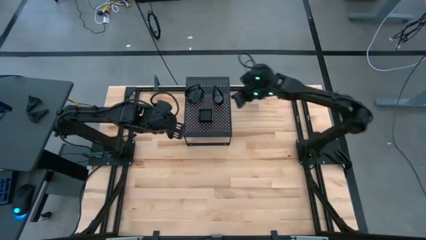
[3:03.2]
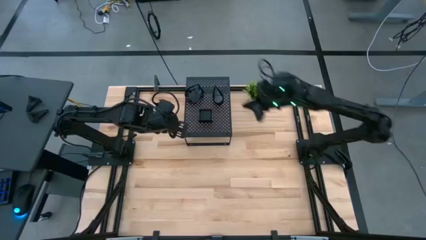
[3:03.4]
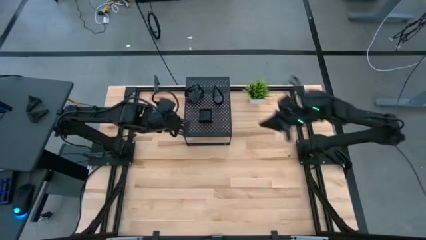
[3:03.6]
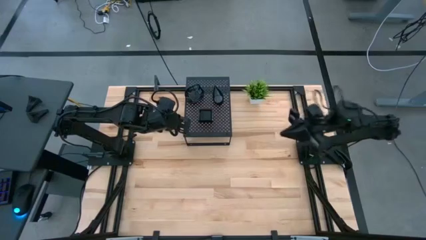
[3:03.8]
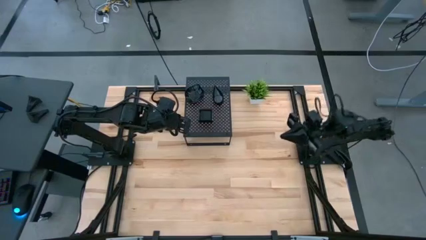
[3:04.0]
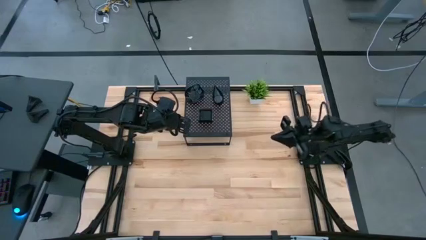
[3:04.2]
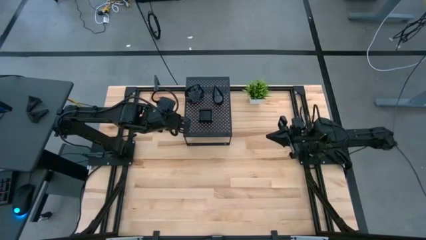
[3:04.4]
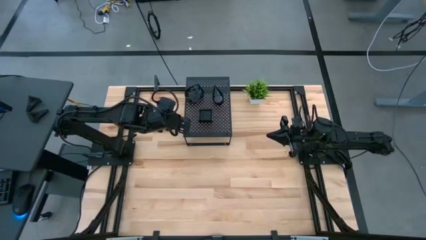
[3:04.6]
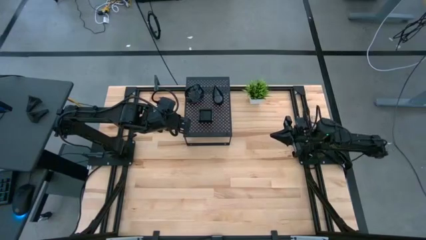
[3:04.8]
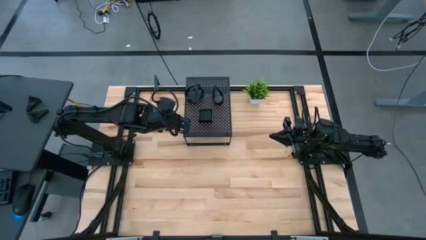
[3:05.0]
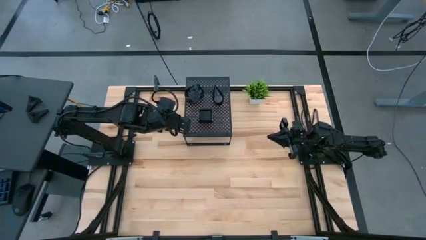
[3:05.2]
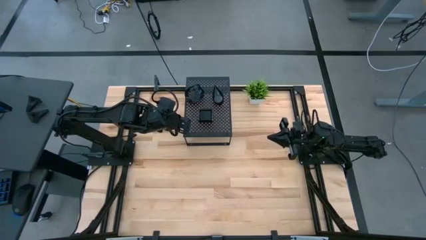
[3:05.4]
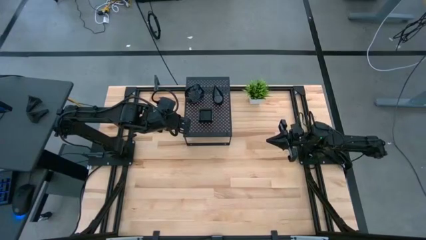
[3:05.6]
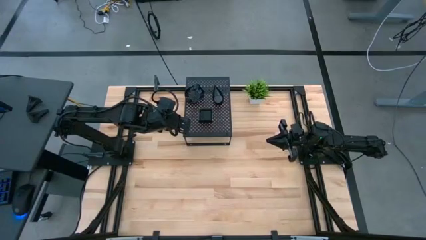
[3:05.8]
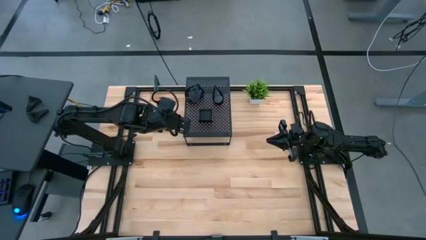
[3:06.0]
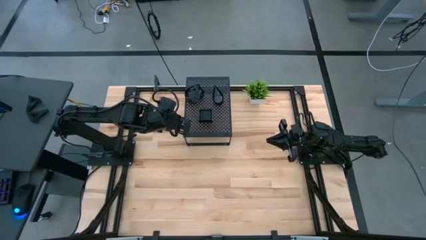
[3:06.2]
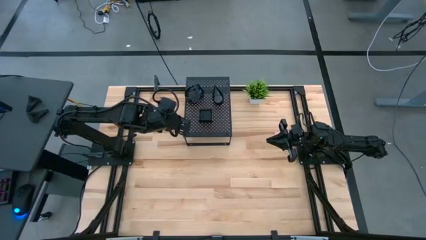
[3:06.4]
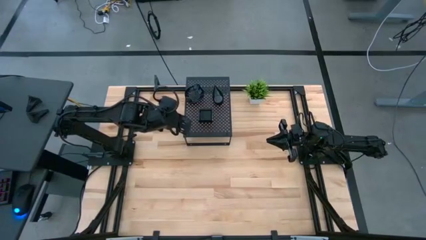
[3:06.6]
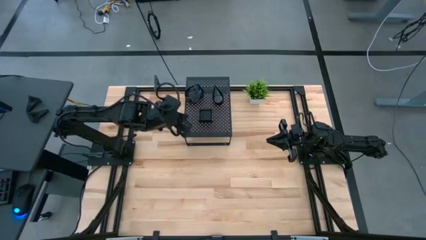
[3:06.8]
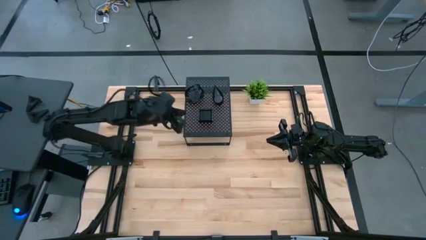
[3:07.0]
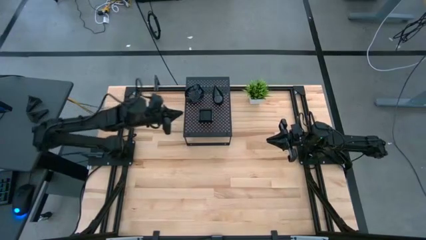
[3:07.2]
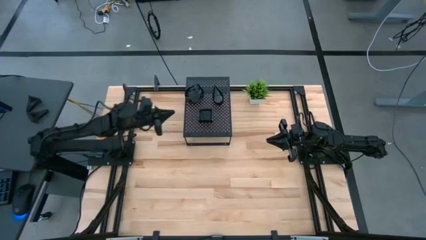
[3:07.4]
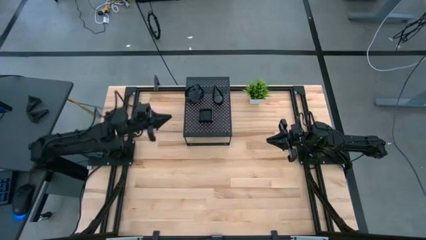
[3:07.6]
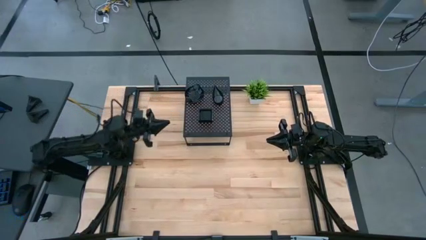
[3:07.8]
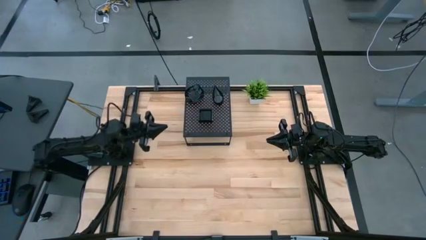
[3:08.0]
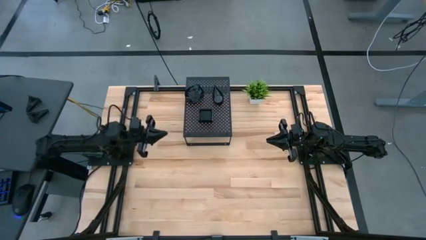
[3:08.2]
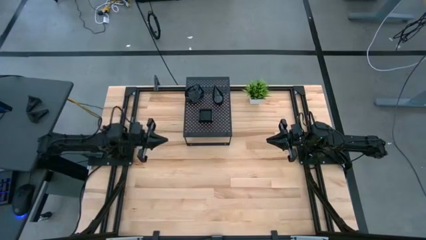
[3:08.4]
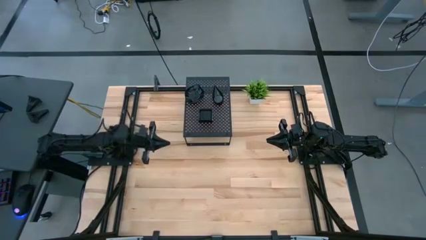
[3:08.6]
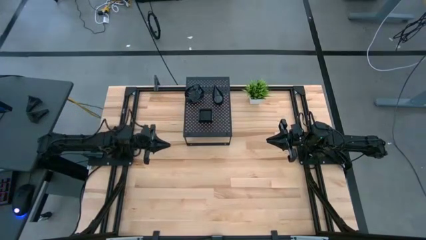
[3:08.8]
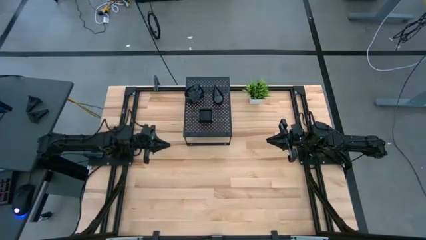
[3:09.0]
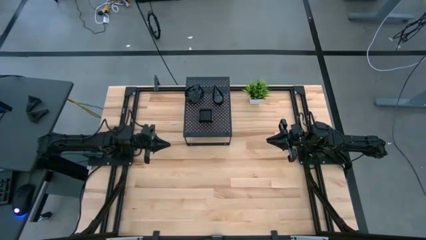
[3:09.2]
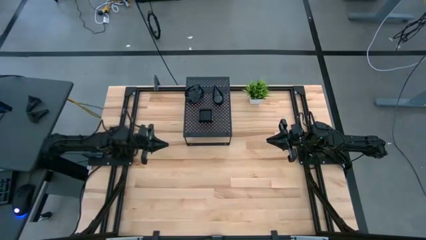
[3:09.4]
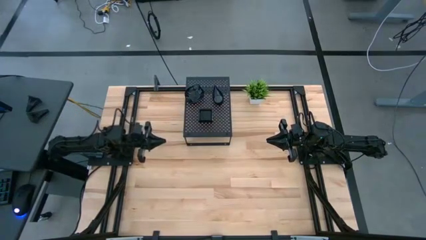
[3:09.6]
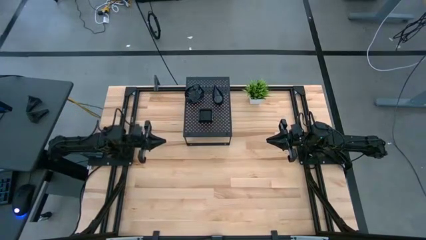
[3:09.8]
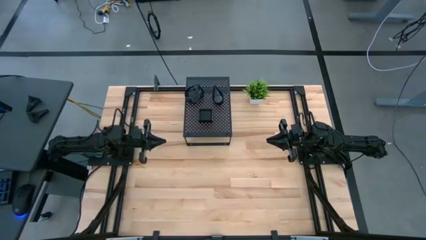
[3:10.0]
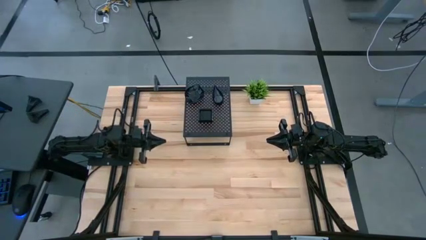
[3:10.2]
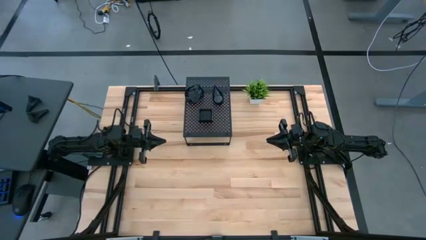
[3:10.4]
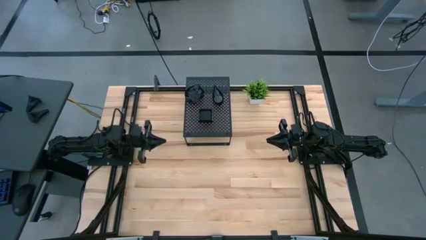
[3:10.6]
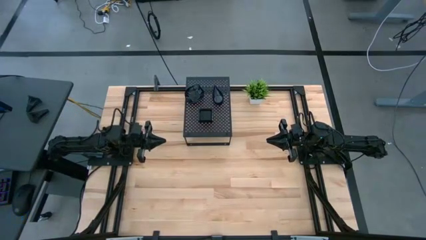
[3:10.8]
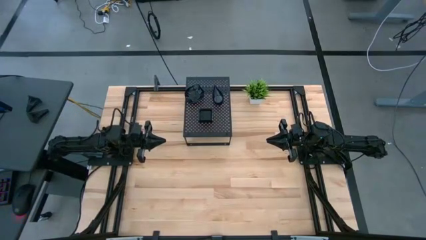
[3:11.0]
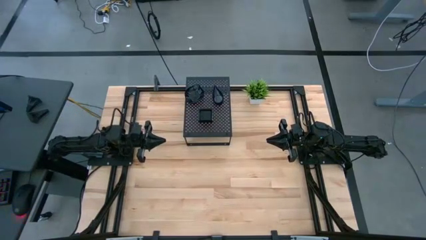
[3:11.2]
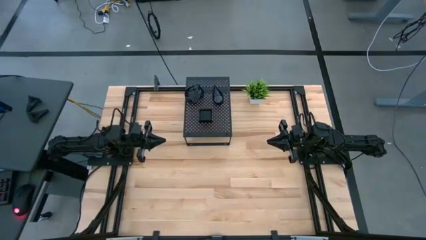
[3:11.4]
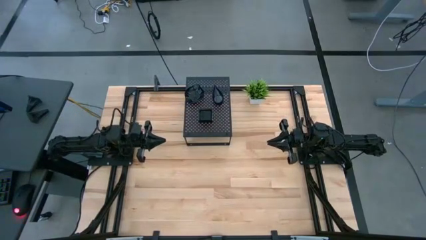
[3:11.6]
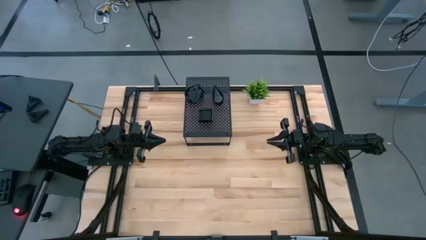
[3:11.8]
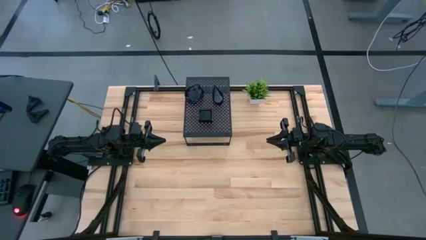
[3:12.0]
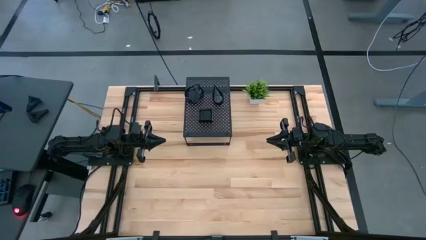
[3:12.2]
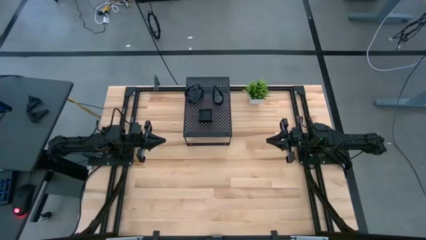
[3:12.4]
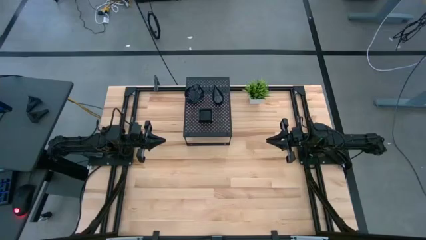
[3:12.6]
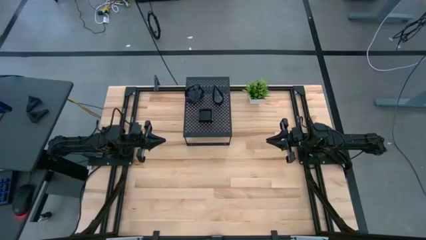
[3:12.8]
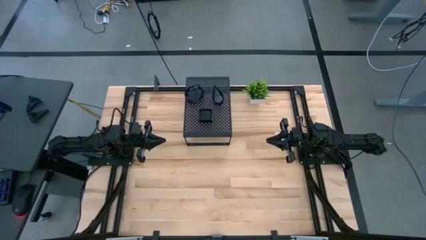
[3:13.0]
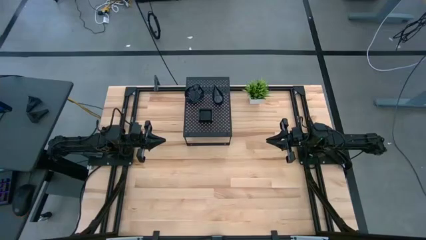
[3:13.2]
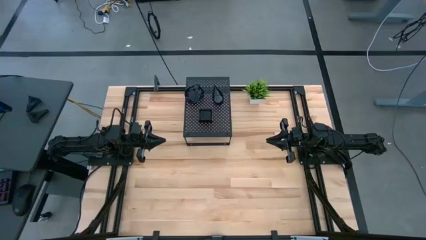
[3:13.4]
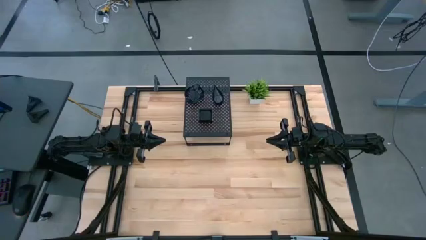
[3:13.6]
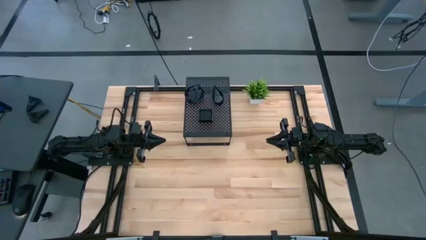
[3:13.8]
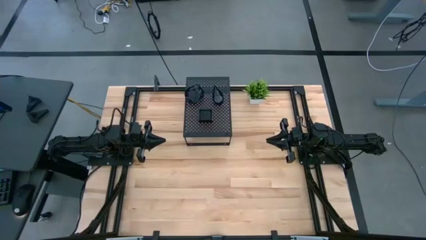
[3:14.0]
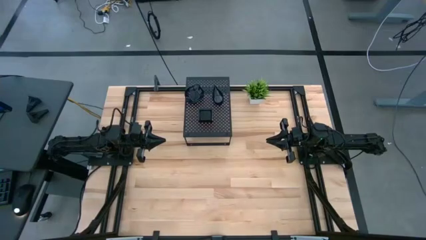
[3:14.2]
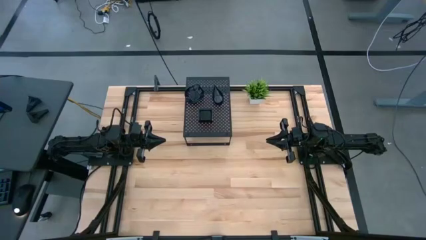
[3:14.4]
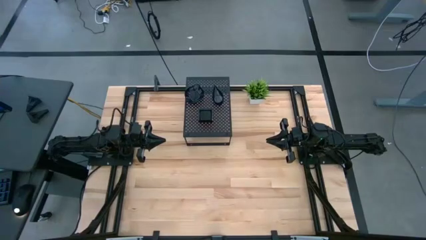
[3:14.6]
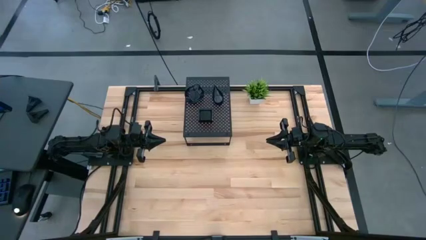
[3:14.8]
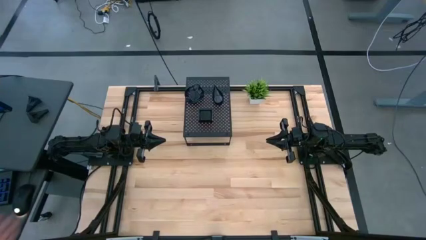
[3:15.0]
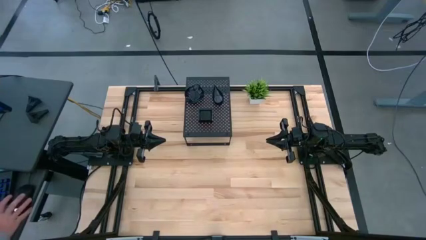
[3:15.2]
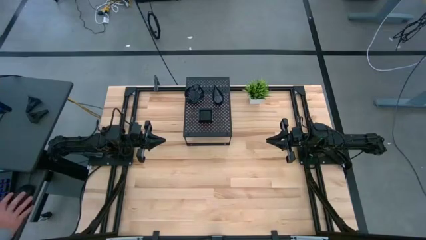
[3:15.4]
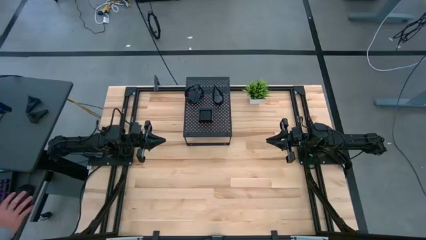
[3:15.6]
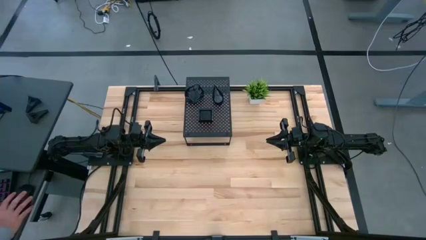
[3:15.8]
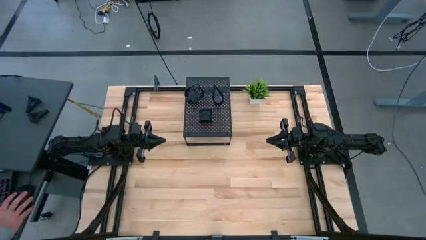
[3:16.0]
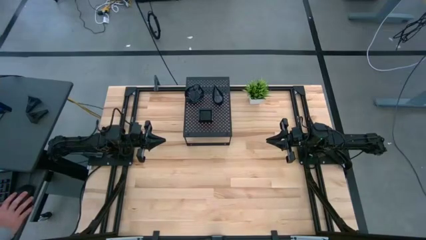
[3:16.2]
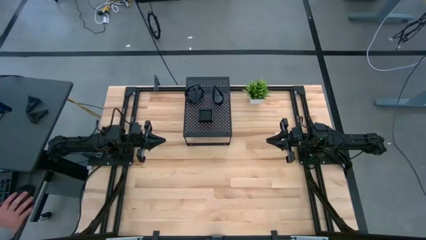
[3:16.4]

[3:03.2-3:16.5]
Task: Pick & Place Mini shaped plates
Return to Home Position

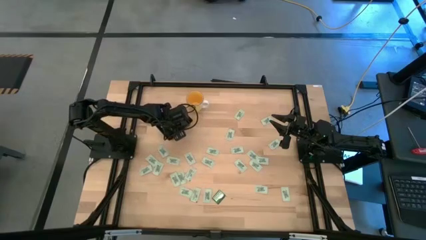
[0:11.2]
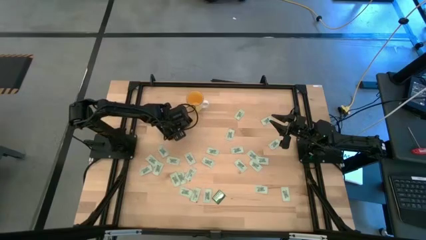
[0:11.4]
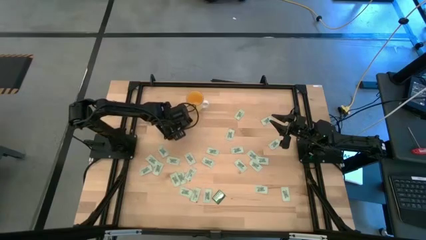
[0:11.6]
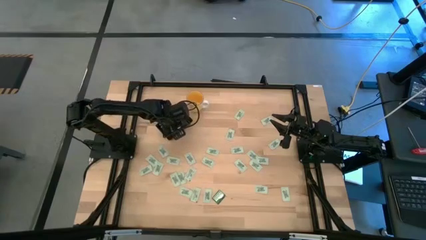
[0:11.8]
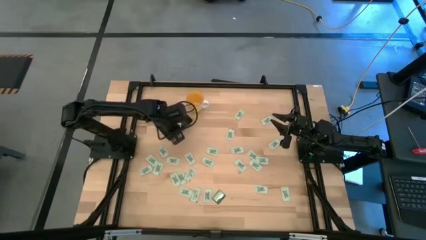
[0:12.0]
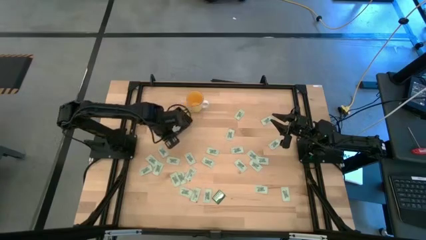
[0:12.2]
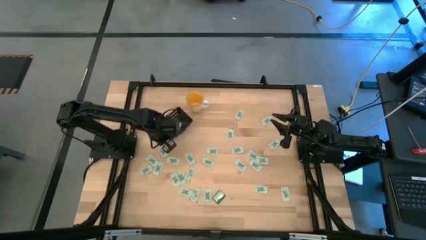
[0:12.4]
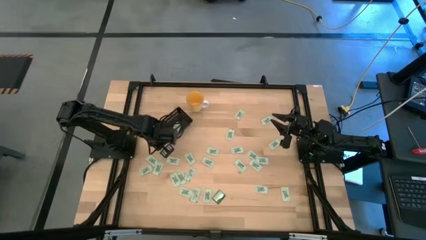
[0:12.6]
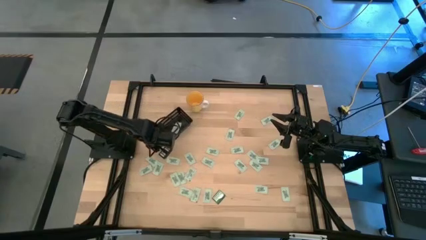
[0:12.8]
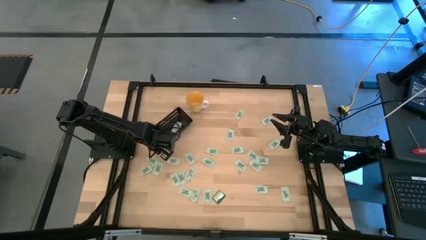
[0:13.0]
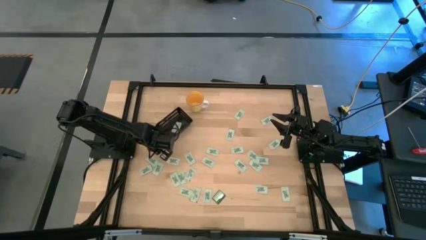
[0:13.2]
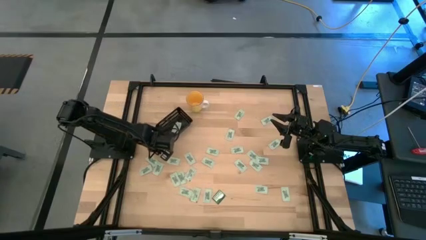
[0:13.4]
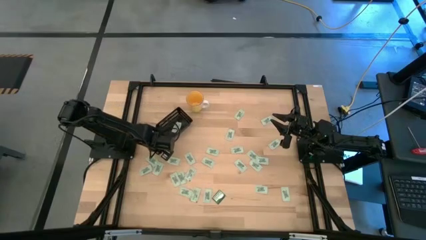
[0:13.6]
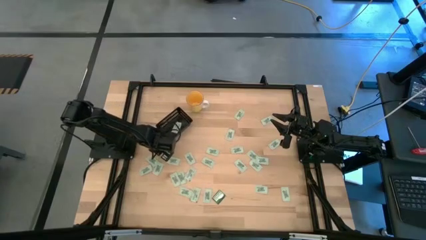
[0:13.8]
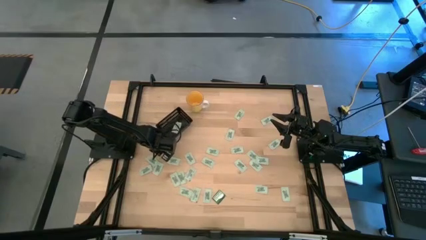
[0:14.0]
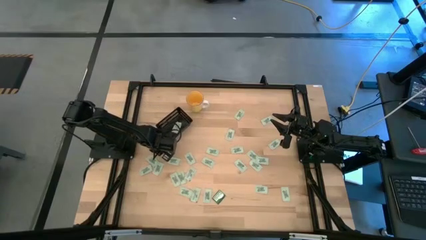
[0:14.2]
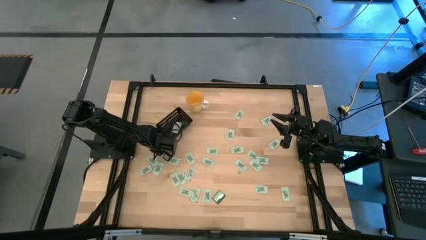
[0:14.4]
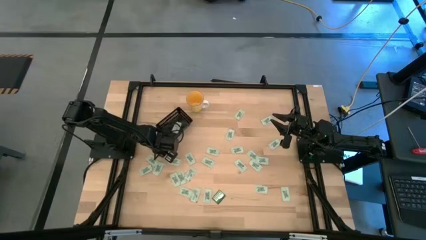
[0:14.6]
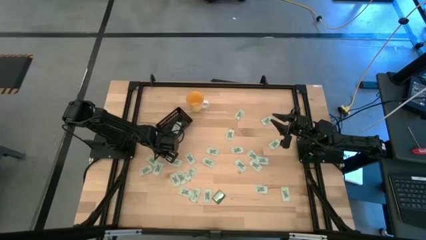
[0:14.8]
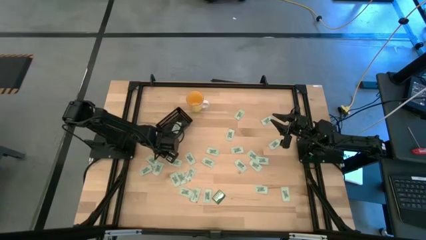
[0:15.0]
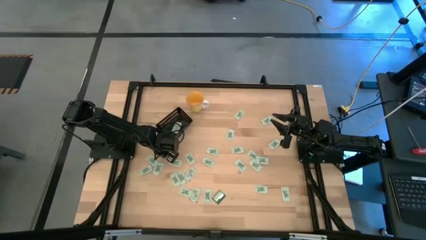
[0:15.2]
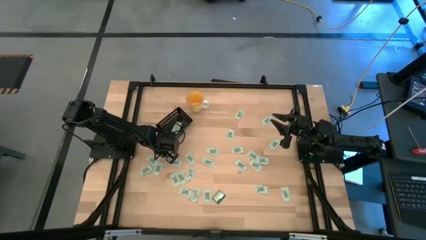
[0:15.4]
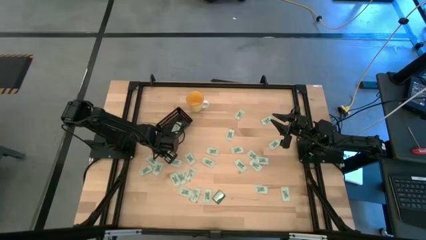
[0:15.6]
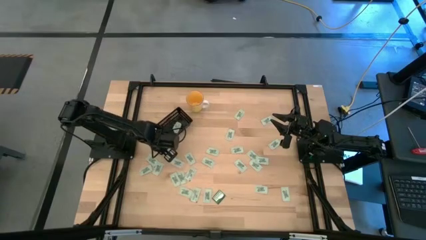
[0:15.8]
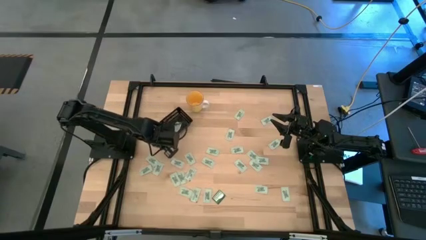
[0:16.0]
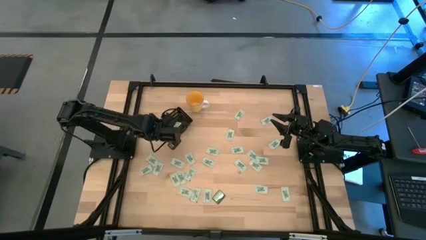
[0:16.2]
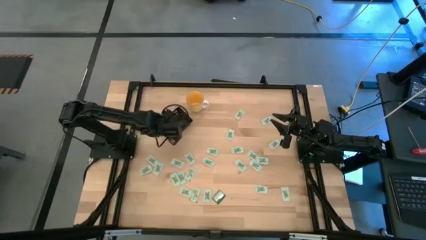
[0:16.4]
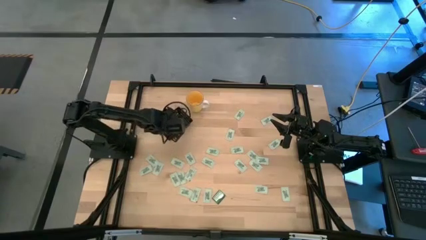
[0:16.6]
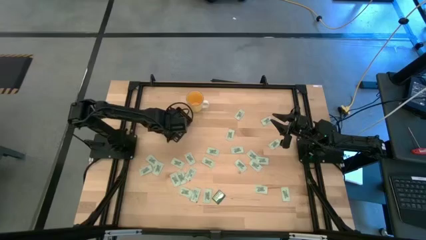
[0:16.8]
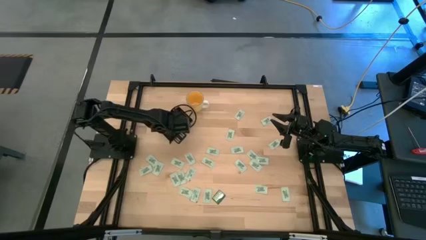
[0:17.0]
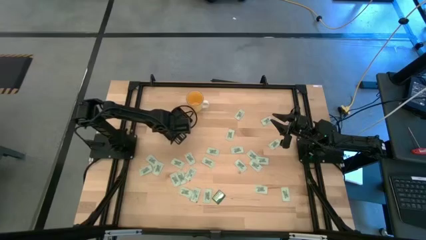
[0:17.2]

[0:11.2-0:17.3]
Task: Pick and place Stevia / Truvia into bins
Put the green stevia packet into the black bin
